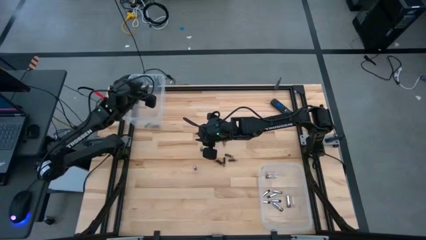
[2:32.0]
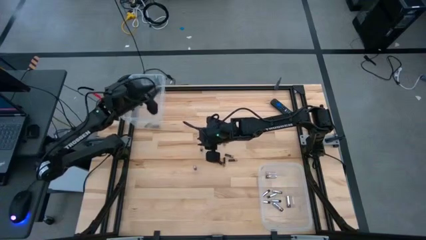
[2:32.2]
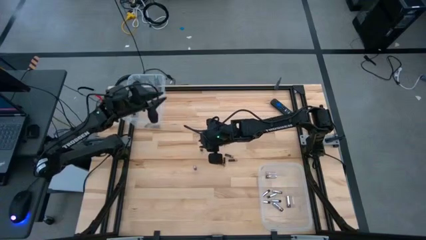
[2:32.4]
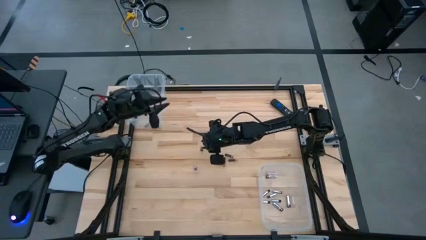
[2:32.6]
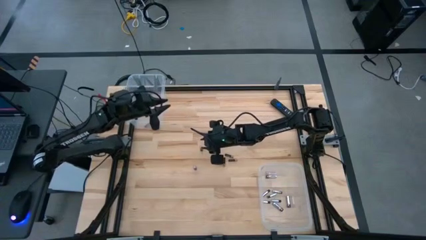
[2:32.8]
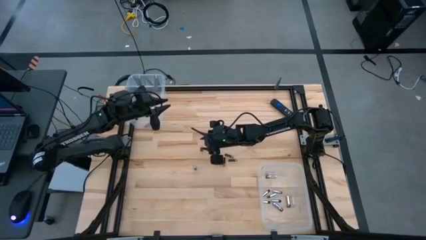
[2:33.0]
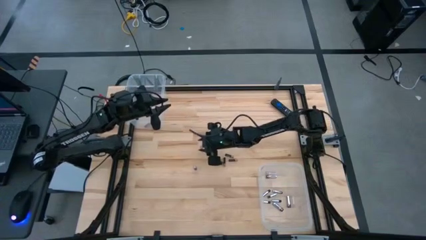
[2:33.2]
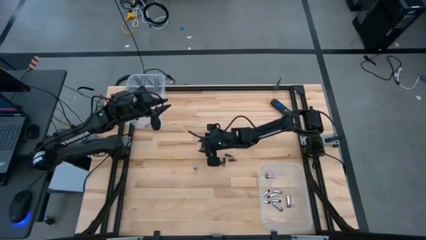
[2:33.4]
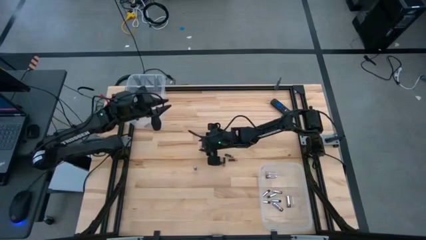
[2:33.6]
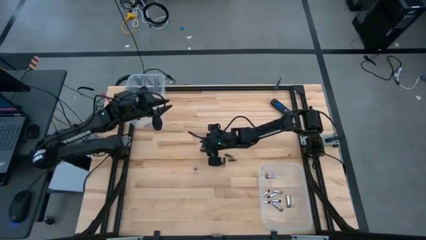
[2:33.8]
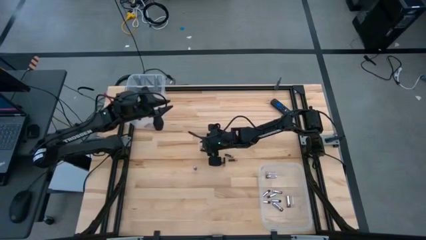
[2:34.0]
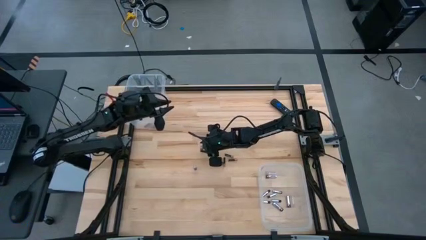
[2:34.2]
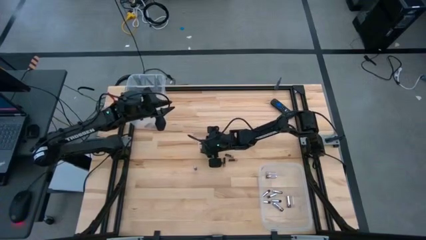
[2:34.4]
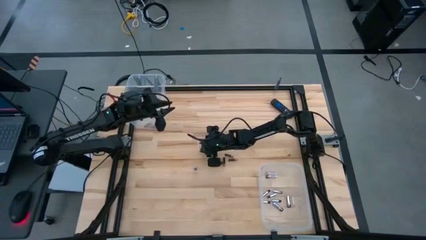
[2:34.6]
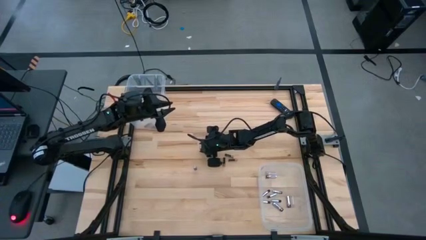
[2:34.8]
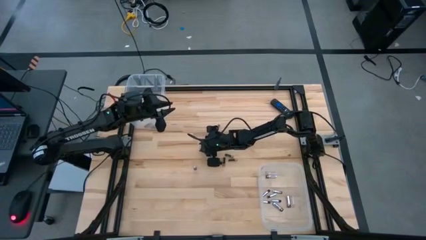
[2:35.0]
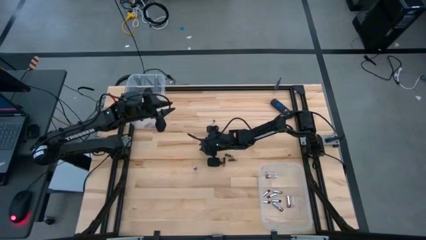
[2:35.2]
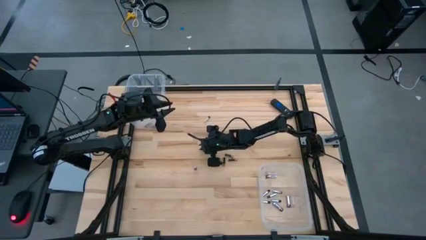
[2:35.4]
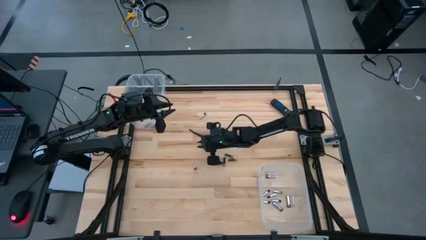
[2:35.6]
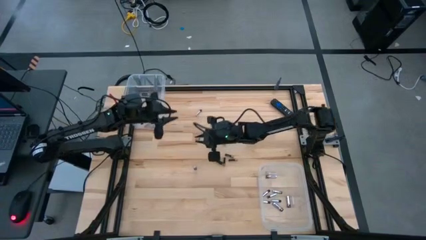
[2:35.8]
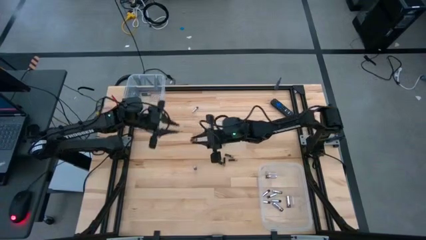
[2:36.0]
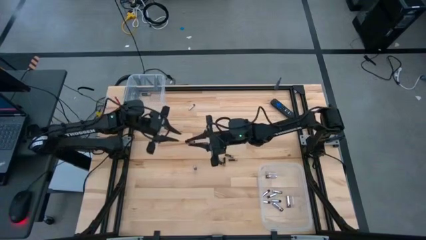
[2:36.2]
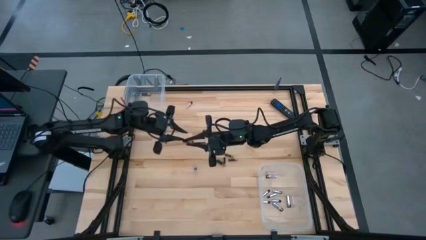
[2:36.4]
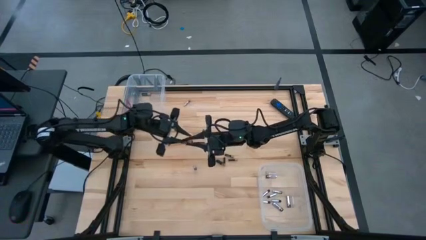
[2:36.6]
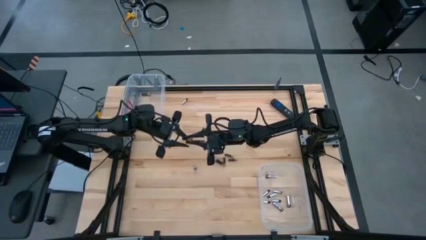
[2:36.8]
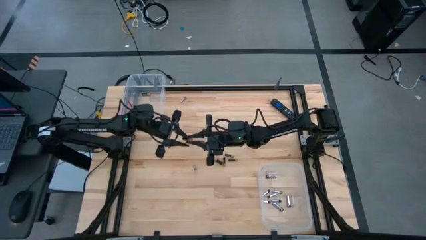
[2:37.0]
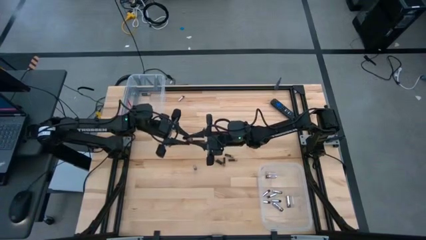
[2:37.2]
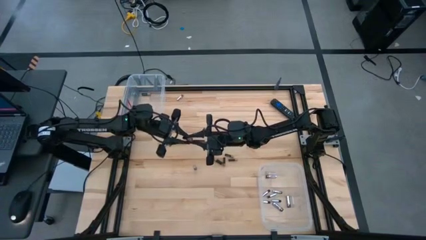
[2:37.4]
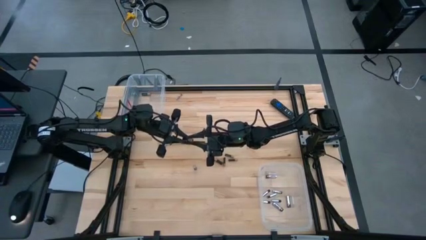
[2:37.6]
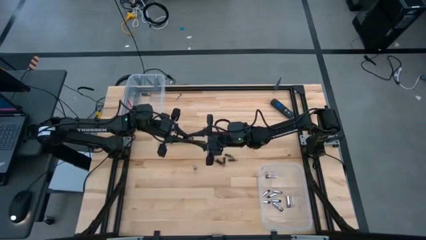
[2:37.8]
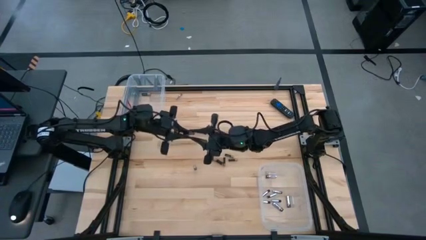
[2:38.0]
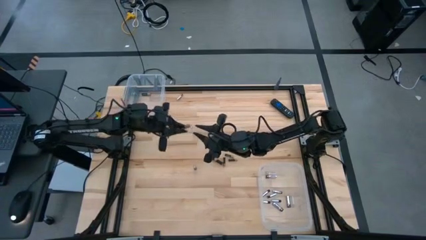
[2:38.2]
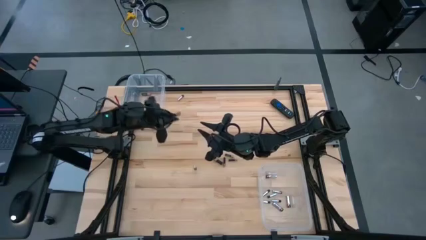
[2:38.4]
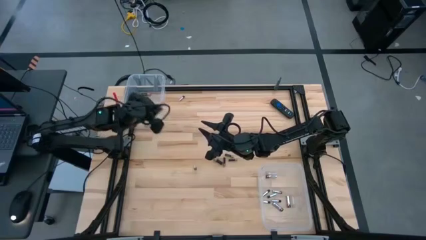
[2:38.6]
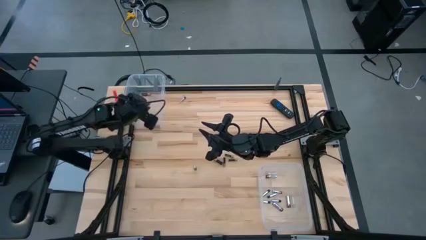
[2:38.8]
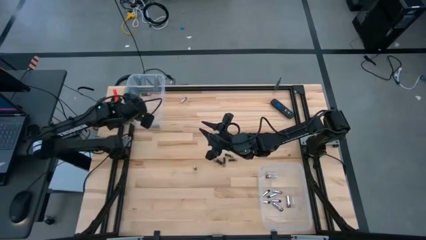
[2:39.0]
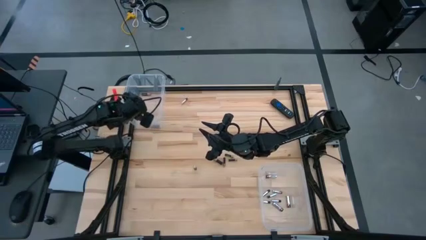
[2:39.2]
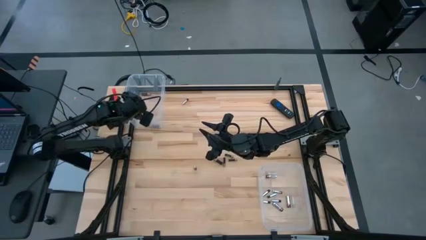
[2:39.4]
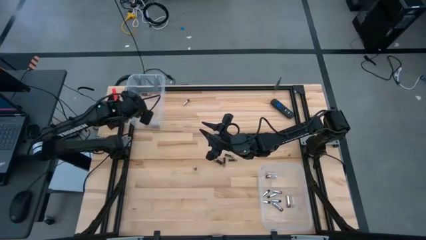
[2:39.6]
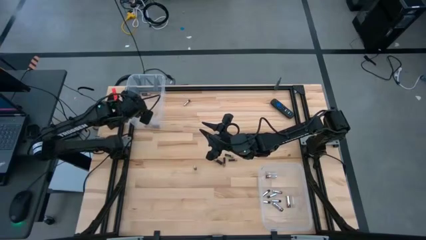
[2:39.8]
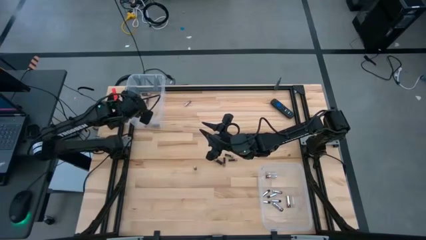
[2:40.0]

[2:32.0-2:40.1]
Task: Sort batteries
Put the black and copper battery into the top transparent bin

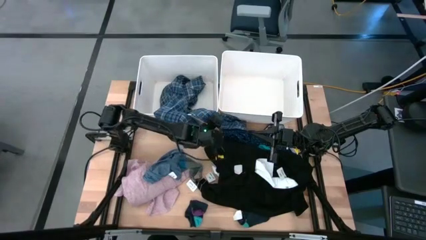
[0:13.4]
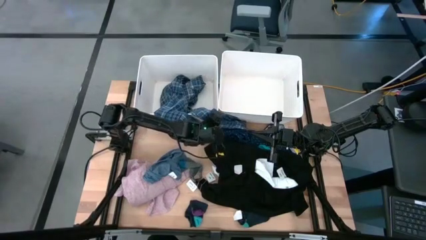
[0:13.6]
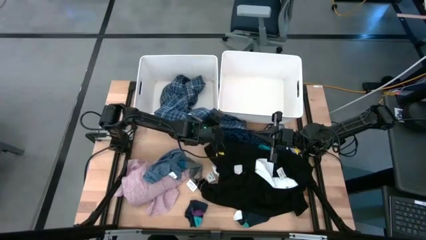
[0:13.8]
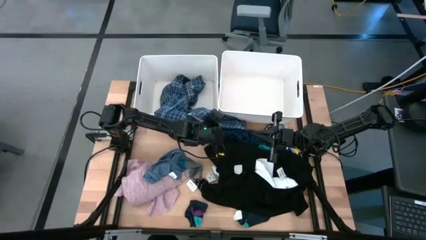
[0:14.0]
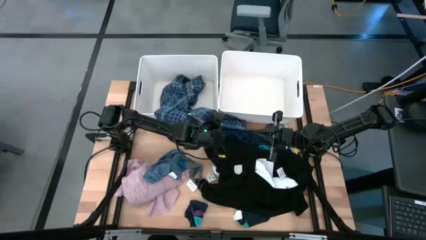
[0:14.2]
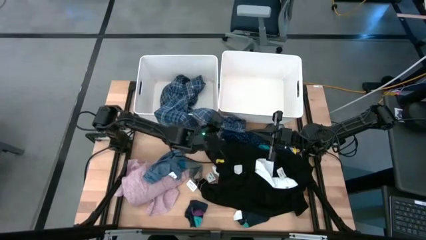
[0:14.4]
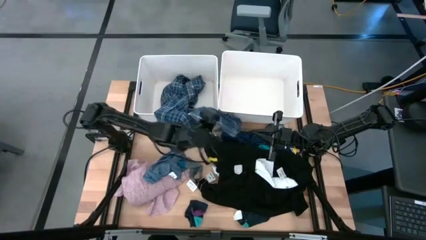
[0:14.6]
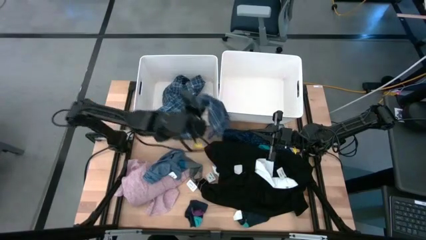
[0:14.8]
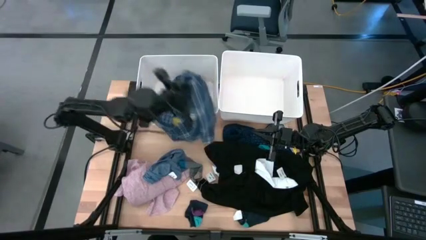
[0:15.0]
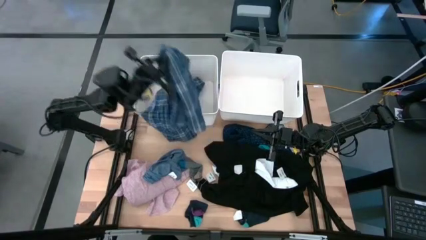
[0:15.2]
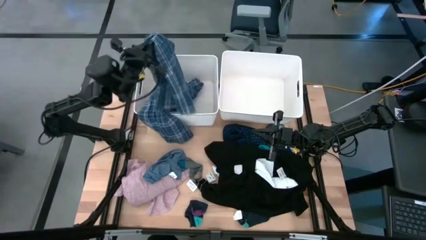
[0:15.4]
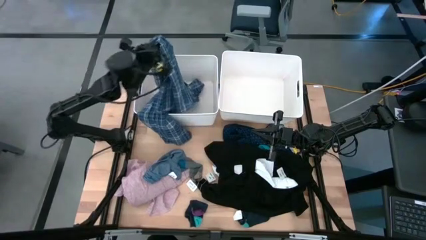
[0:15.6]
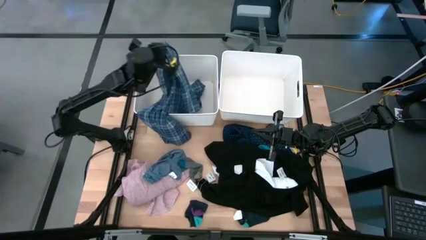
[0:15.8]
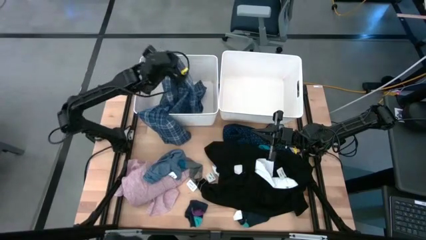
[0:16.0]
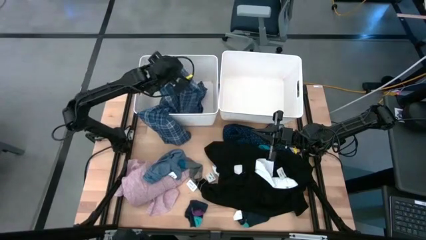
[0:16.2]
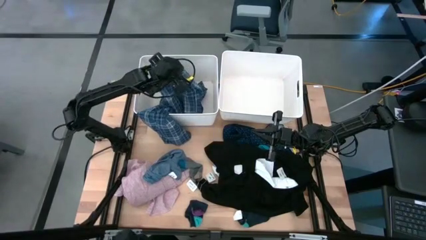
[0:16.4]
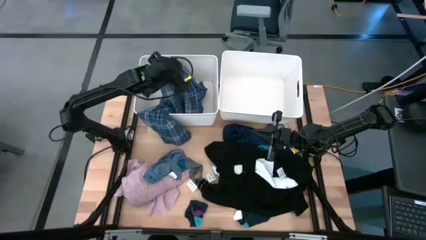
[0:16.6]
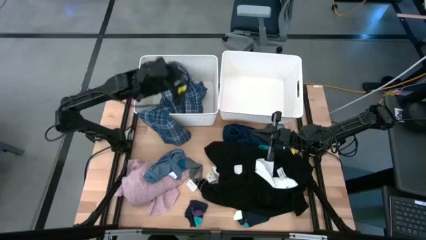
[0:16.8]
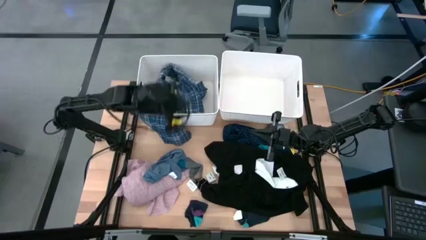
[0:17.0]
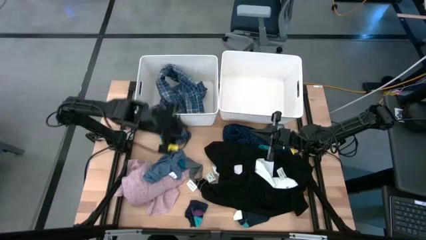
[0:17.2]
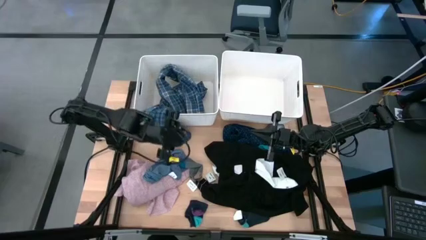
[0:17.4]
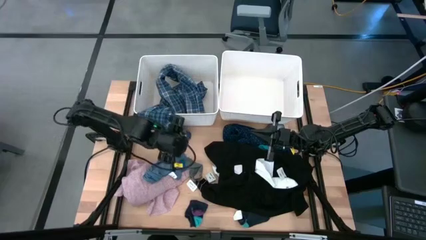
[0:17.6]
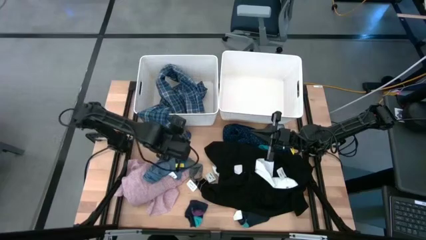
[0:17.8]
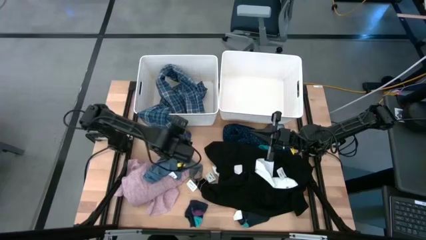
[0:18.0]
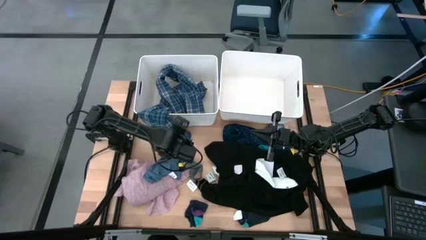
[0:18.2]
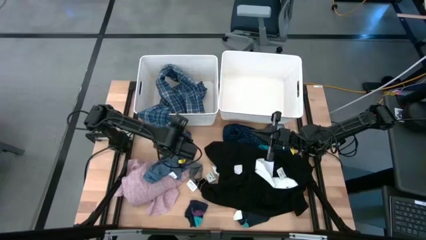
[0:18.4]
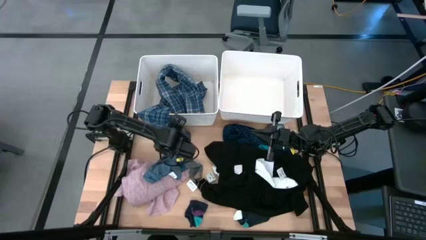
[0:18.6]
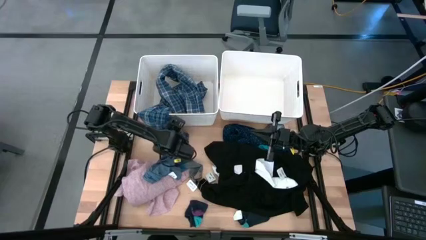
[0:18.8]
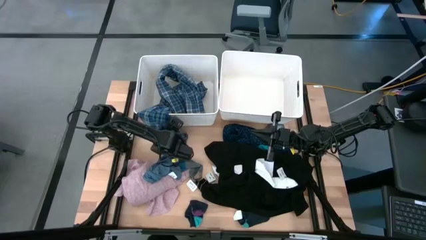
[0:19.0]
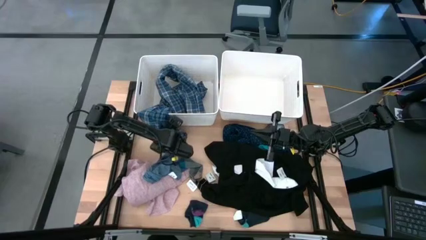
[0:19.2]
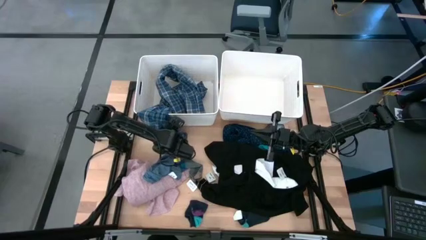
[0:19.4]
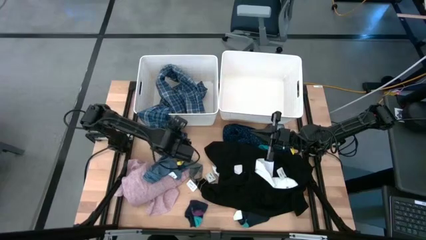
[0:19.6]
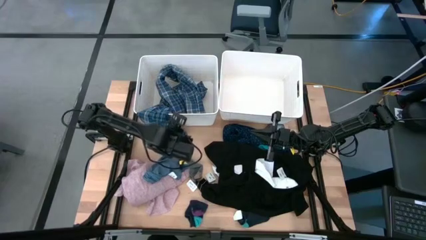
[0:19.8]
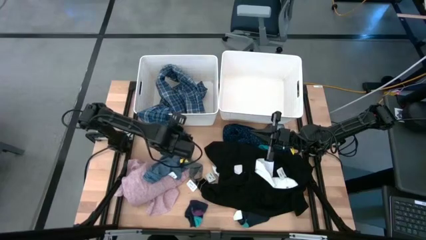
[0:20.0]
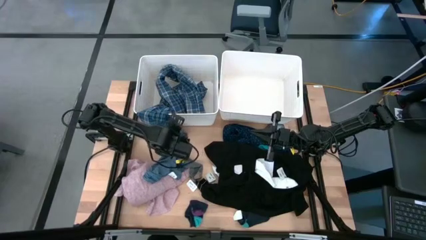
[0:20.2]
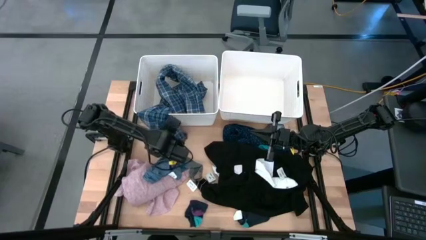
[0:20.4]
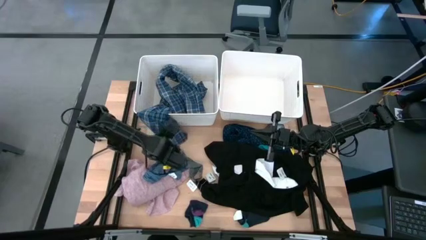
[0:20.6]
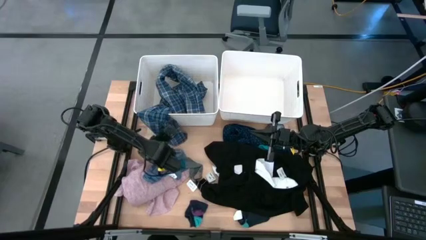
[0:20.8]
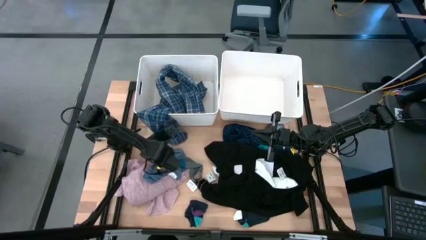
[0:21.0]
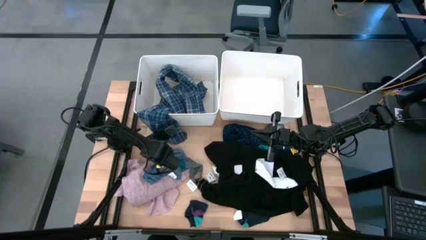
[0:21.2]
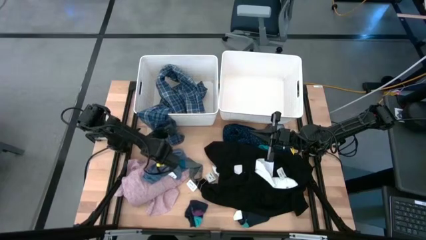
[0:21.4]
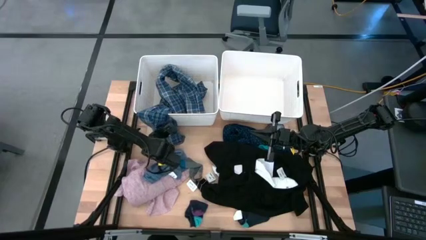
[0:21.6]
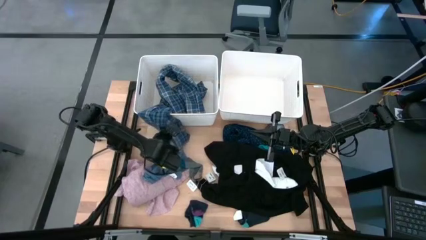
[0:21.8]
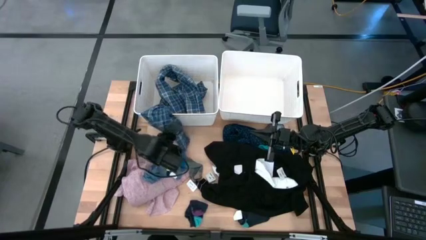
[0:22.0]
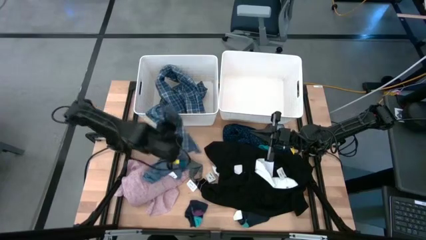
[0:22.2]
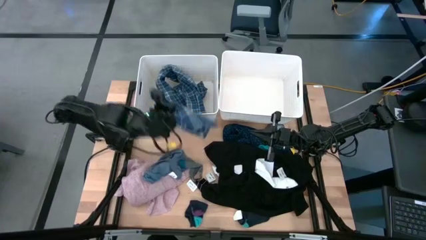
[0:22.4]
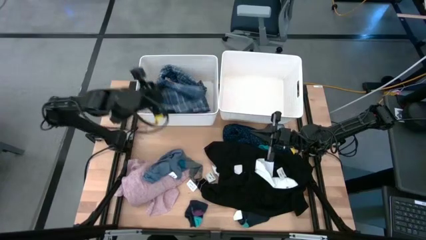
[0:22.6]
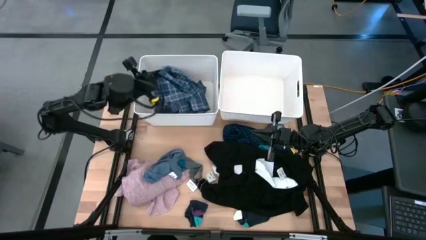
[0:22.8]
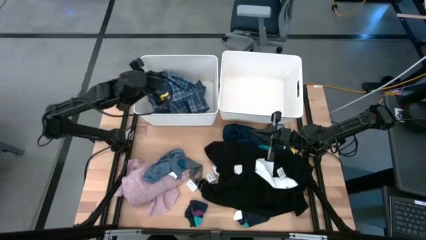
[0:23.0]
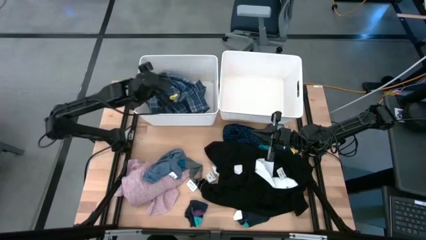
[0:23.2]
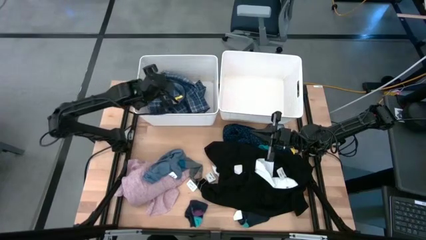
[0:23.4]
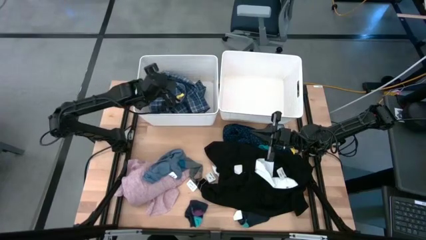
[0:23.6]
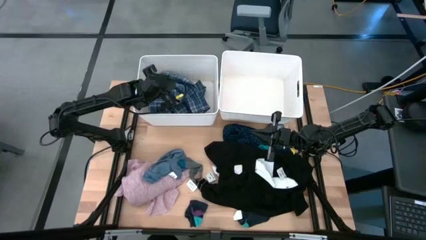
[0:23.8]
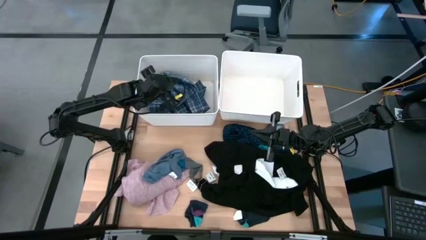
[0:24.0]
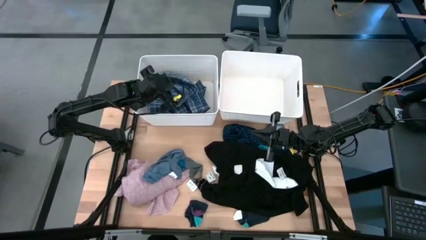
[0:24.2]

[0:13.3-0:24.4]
Task: Sort clothes
Put the patterned shirt into the left white bin
